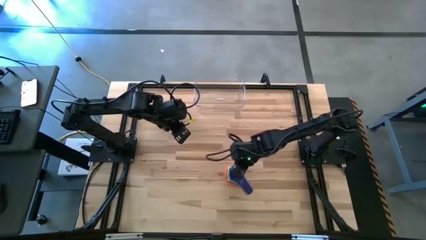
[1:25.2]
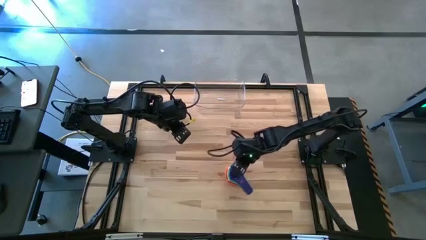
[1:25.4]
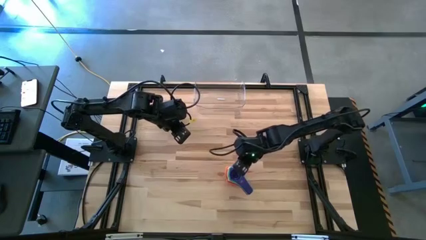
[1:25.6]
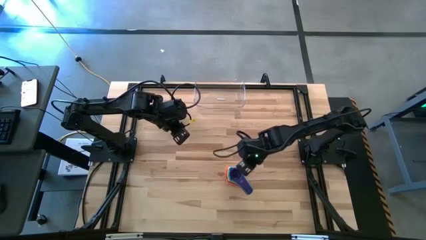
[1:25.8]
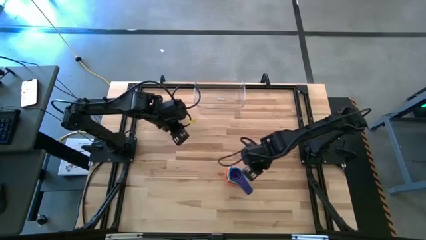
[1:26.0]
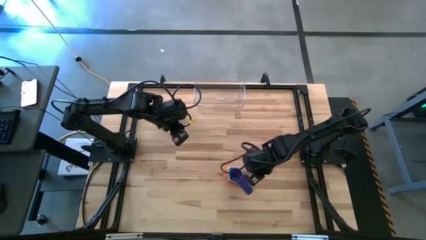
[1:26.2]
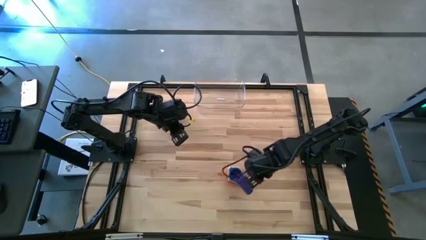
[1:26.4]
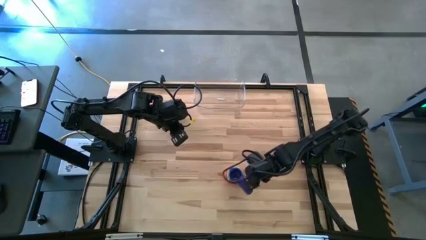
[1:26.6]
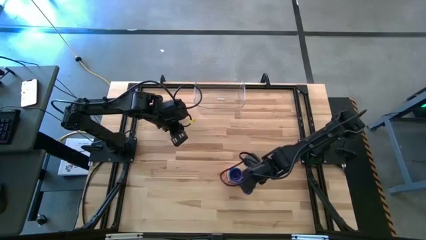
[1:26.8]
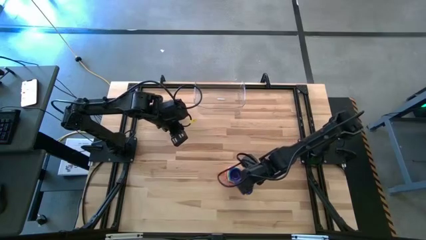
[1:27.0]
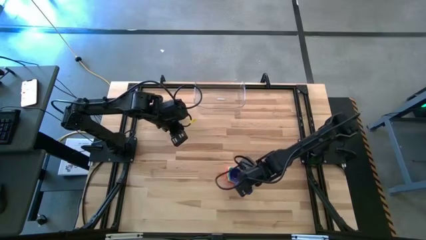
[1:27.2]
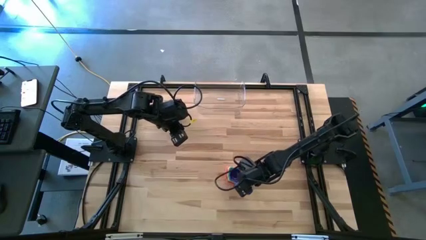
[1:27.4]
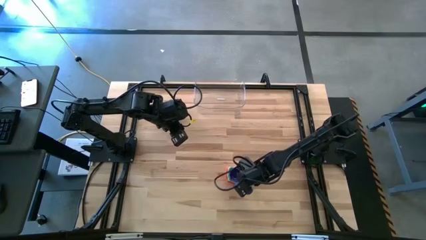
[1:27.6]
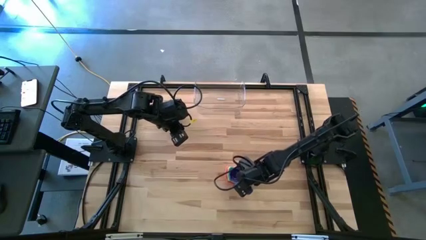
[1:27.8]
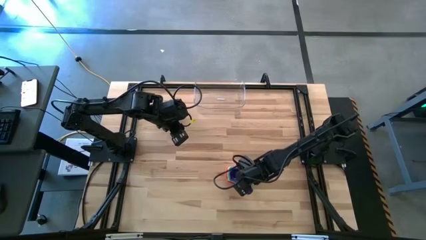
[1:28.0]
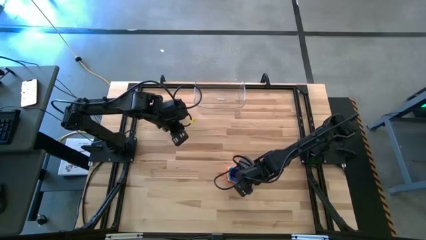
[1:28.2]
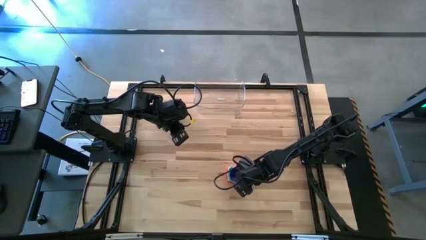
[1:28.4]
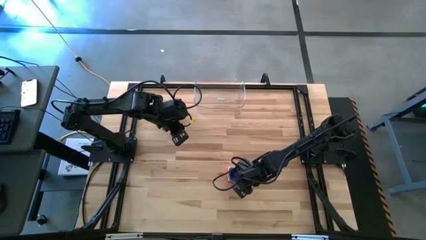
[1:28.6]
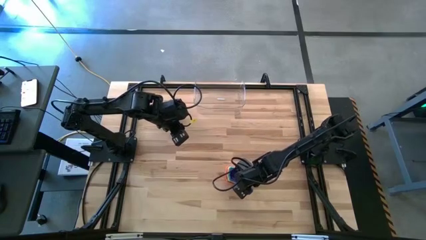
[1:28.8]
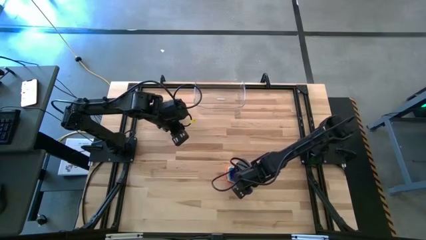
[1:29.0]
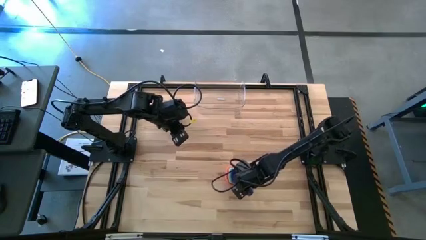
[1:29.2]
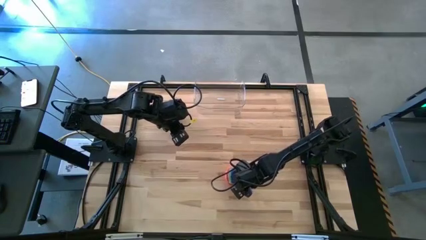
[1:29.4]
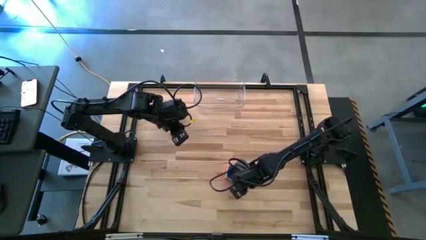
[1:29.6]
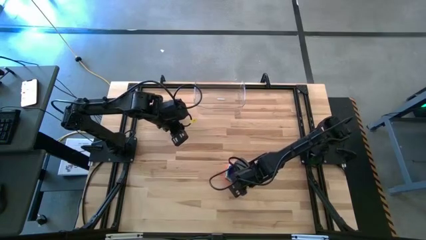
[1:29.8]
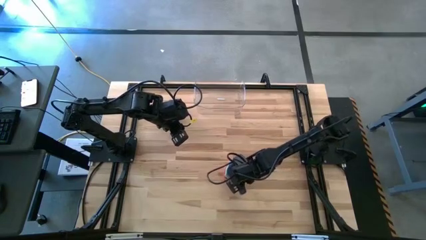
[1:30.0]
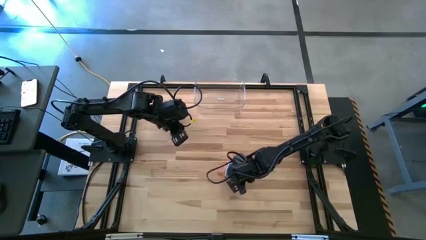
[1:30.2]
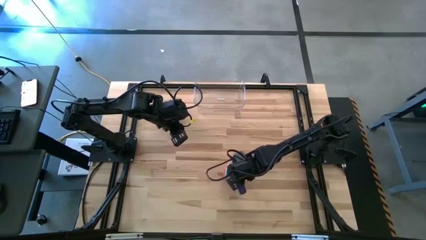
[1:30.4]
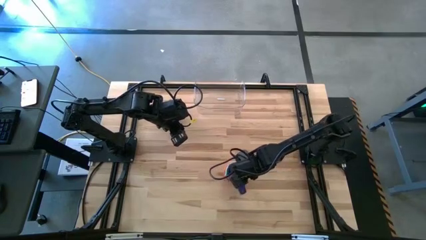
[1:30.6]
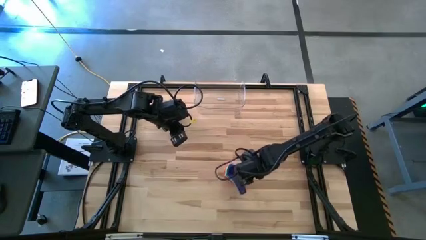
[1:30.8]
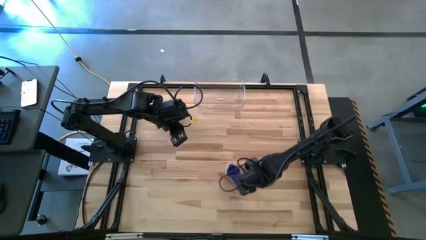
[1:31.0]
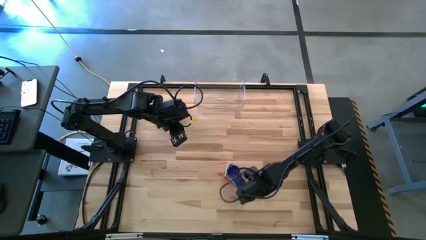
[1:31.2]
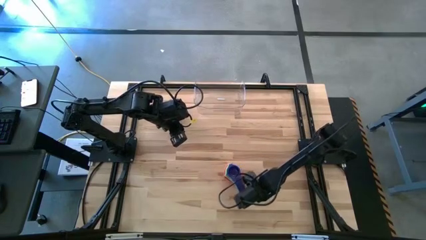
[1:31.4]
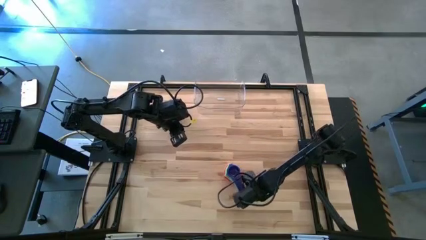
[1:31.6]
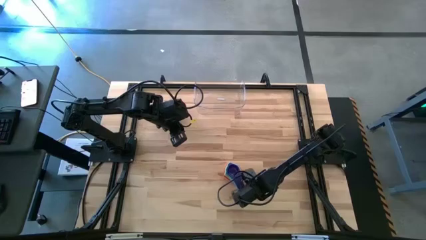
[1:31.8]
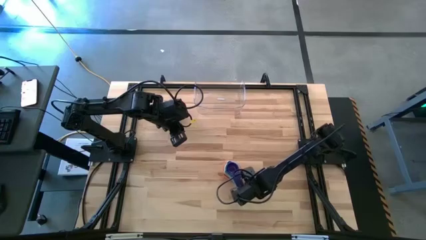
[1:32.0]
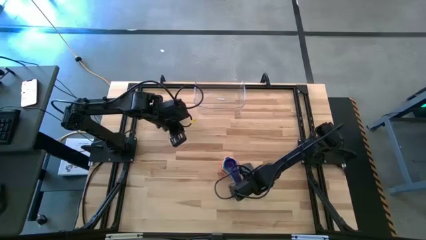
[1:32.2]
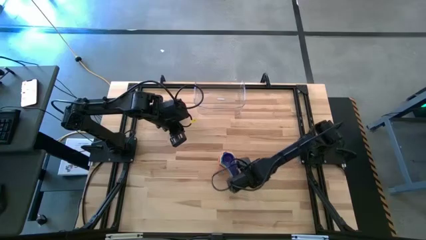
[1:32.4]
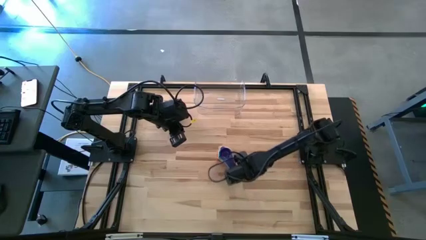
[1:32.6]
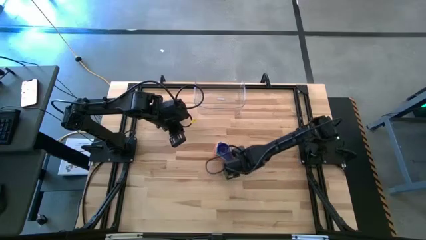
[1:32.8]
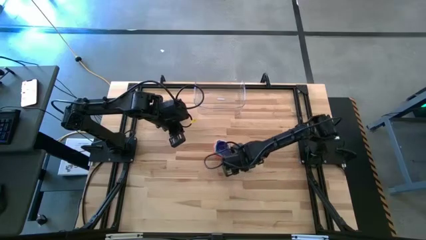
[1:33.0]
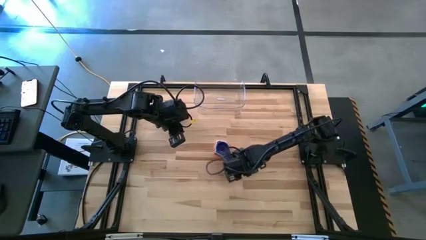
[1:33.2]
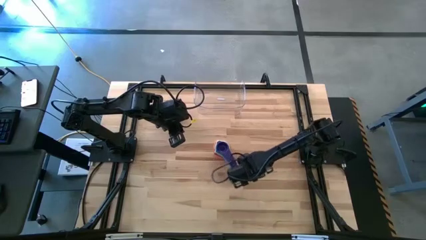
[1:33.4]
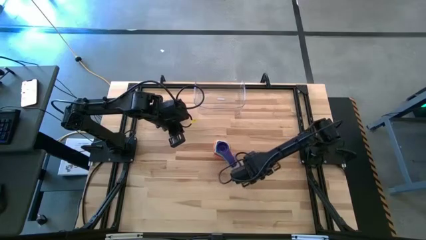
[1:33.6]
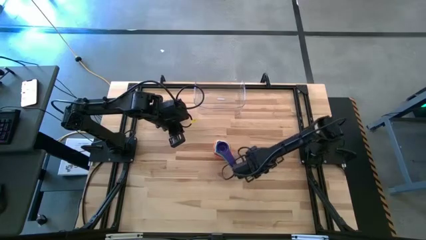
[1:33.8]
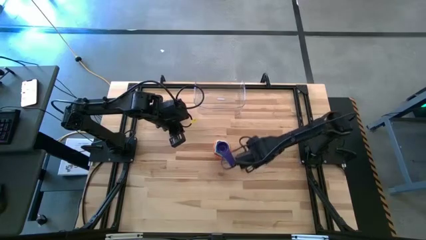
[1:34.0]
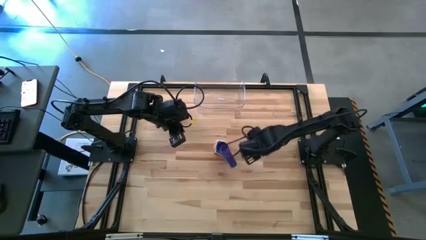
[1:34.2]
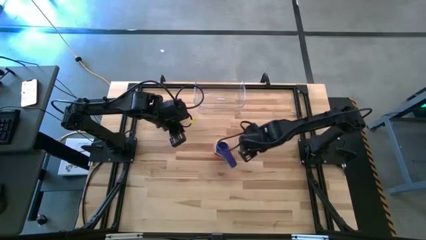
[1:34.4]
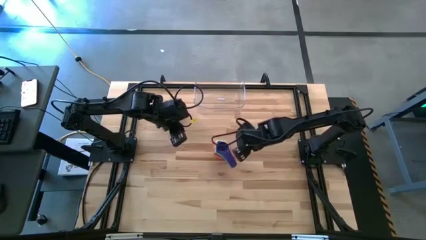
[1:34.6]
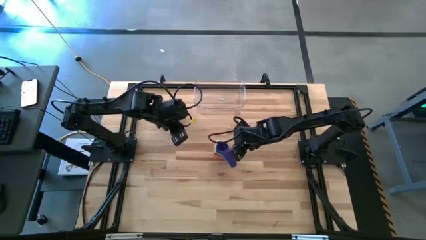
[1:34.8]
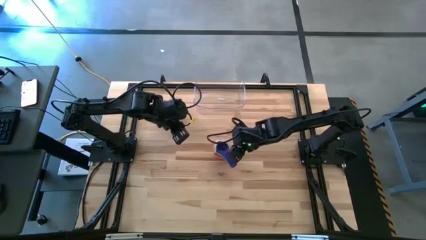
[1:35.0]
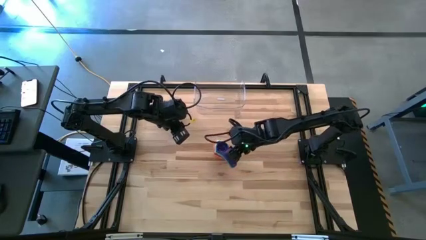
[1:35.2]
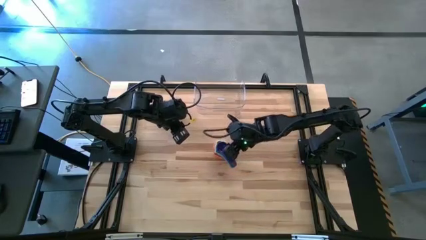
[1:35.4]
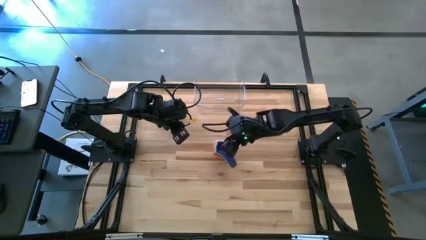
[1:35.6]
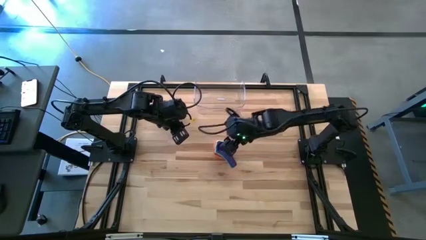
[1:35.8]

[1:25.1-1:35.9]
Task: Nest measuring cups in basket
Put the nested measuring cups into the transparent bin

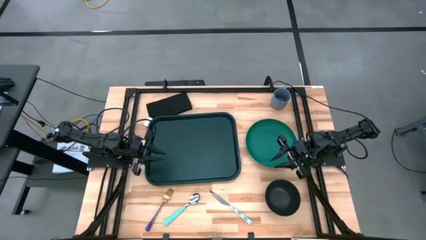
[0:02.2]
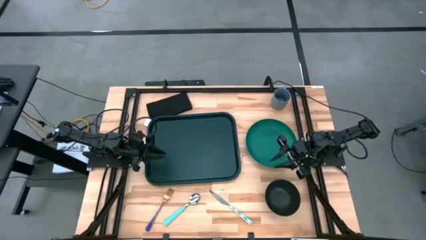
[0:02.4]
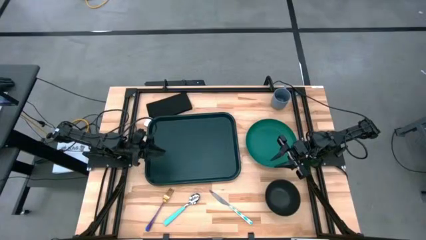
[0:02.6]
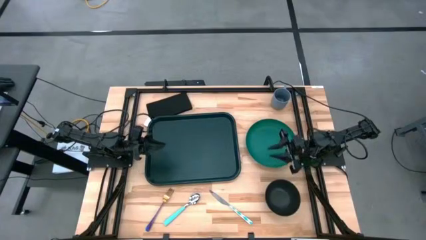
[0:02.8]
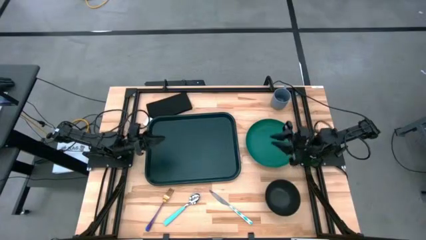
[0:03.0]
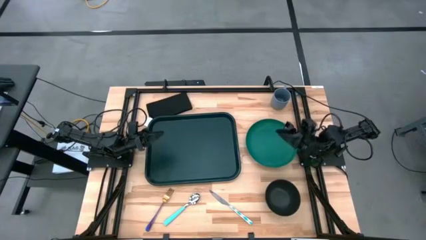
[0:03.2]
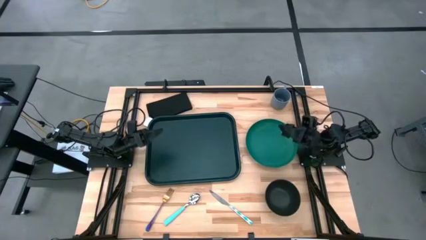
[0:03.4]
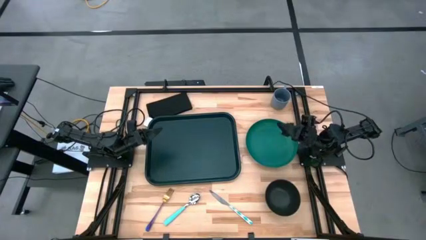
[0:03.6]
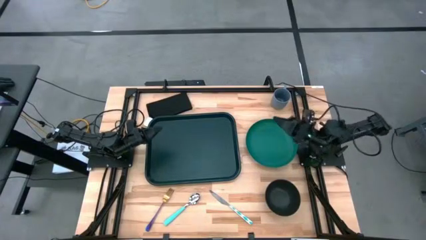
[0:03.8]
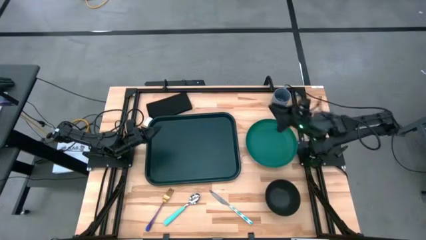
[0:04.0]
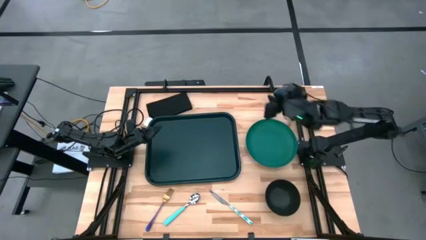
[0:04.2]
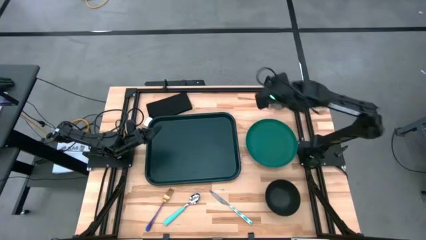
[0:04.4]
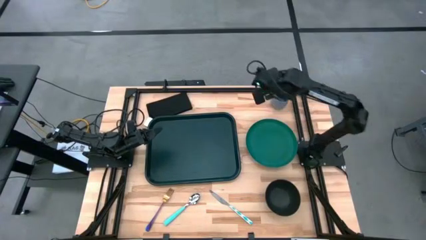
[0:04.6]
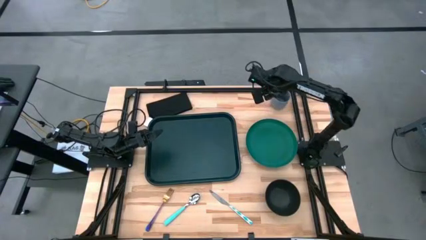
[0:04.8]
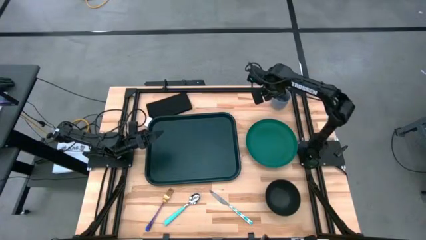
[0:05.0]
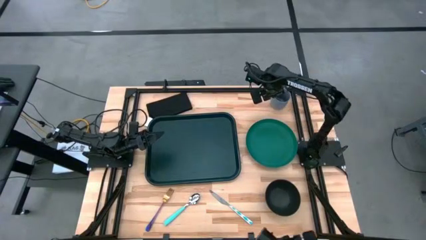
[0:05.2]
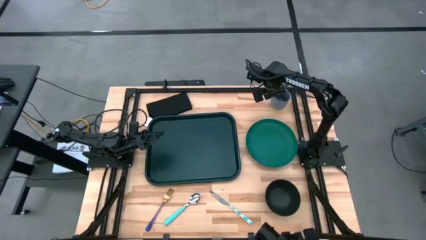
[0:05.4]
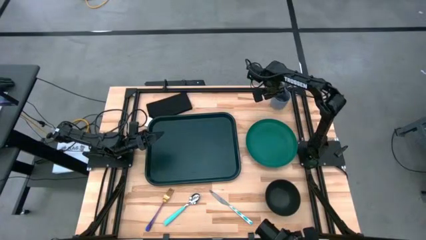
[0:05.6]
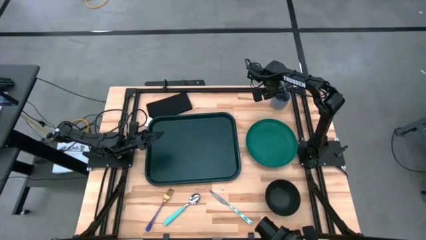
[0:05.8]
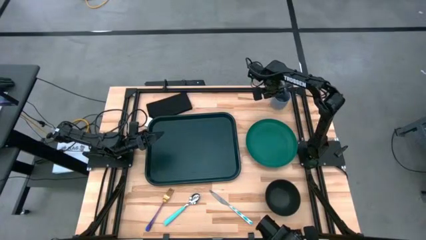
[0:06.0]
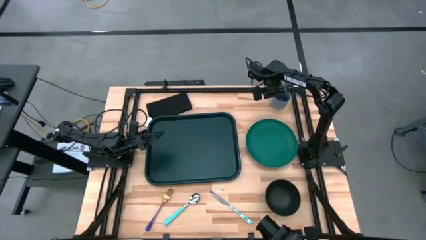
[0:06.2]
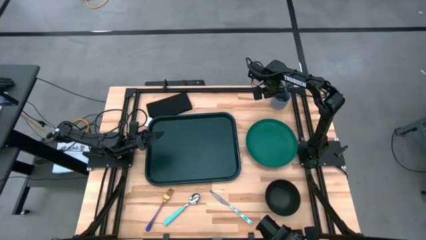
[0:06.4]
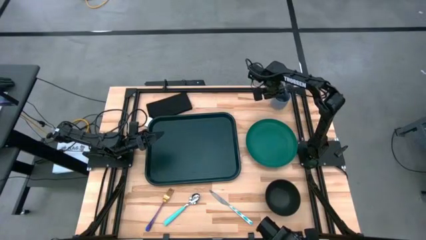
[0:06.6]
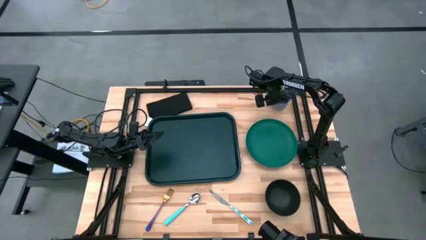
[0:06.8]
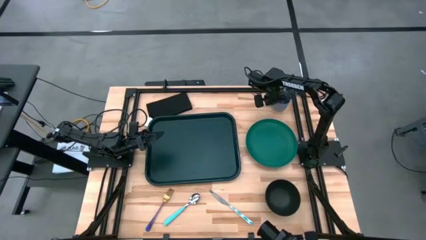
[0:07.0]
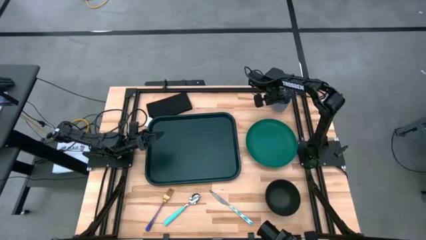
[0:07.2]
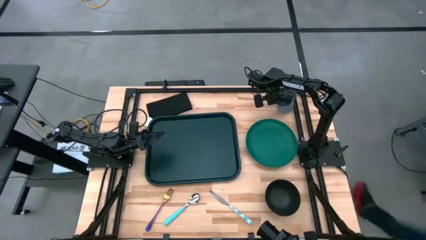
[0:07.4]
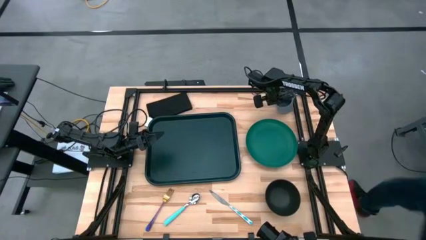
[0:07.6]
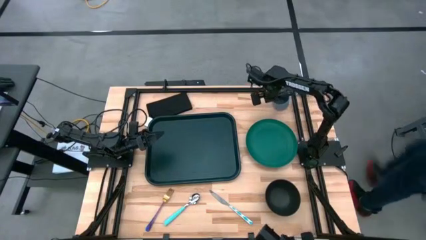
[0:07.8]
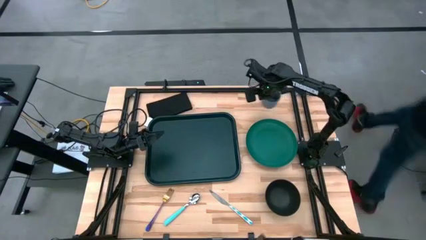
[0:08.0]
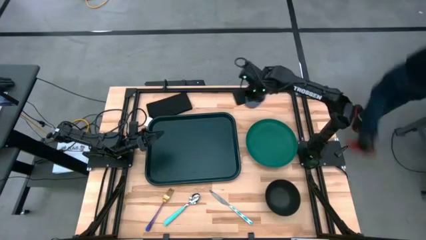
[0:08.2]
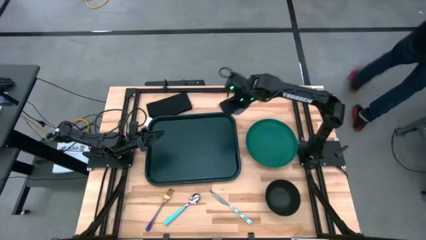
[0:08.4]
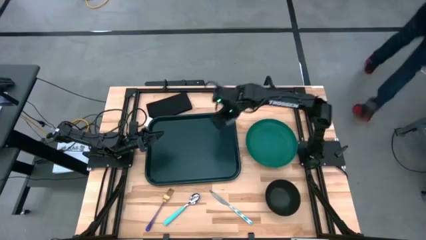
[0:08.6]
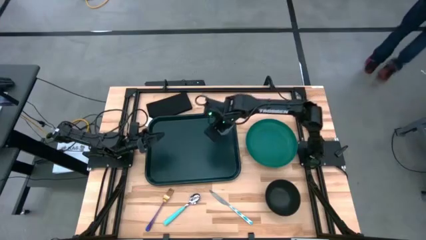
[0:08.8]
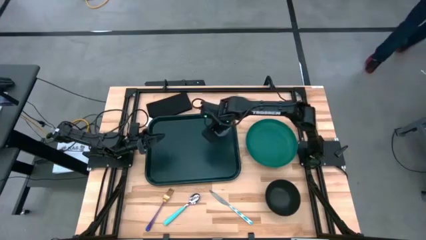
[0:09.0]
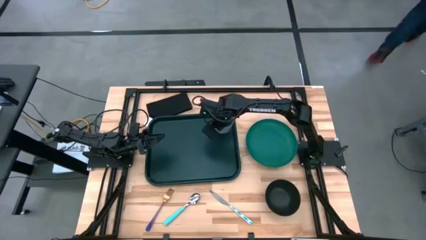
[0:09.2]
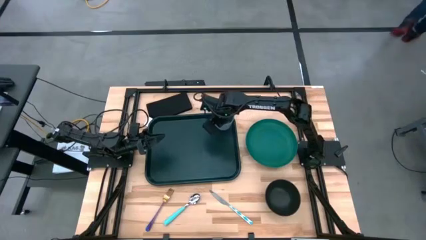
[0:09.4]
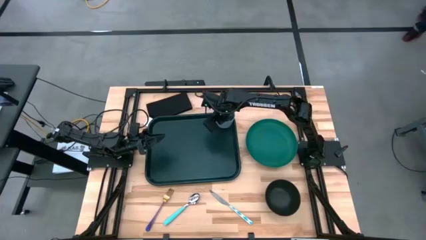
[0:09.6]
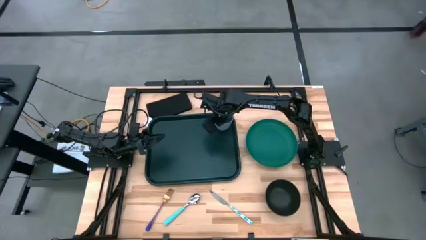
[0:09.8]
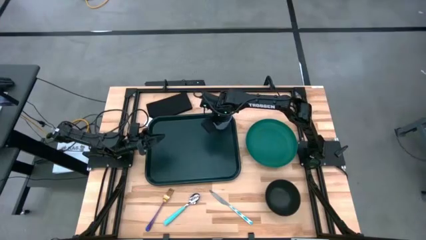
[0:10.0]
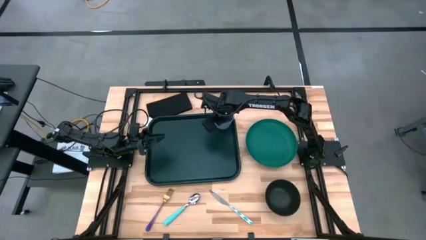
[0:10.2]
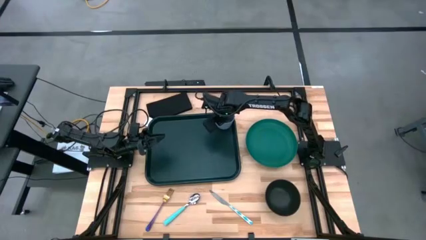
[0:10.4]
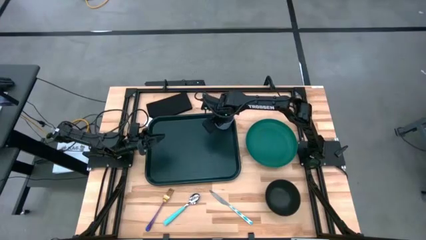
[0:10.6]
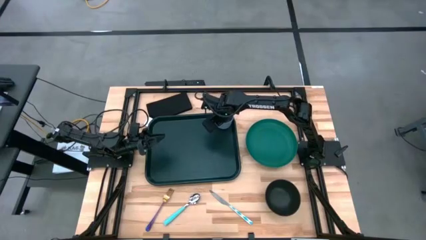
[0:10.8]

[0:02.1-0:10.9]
Task: Set up tray
Put the blue mug on the black tray
